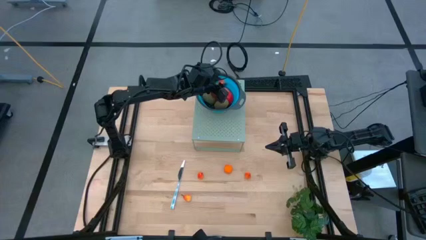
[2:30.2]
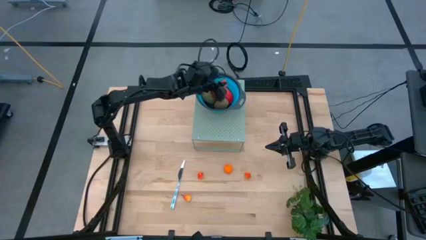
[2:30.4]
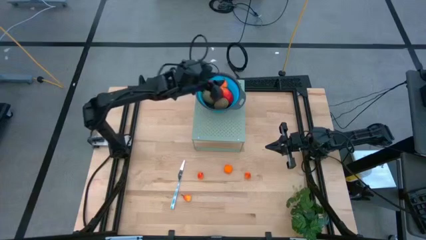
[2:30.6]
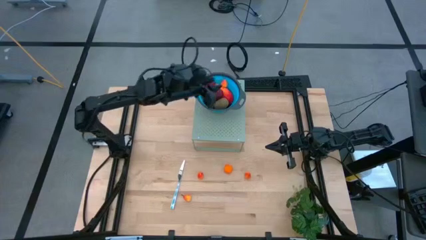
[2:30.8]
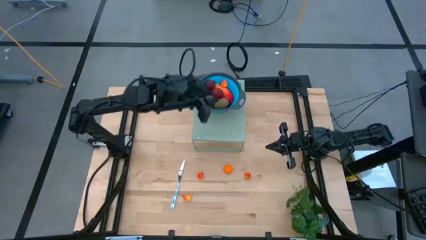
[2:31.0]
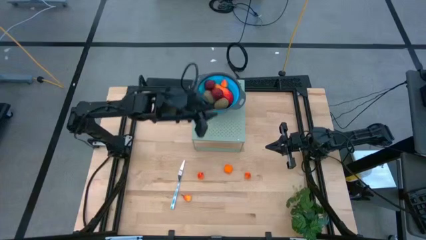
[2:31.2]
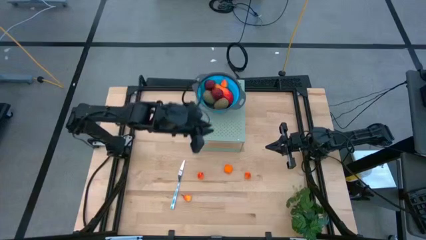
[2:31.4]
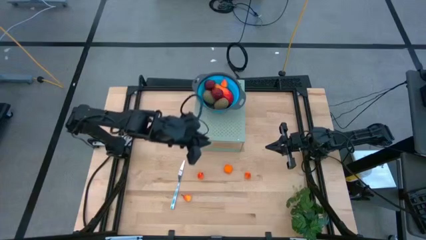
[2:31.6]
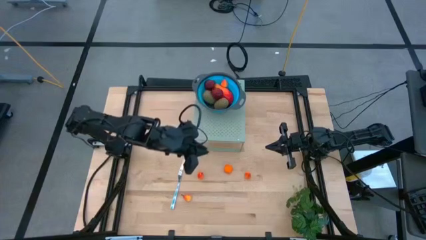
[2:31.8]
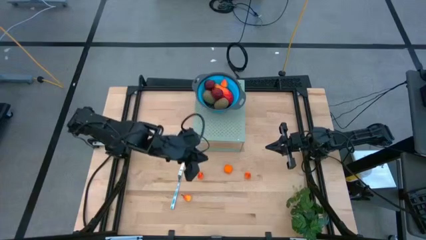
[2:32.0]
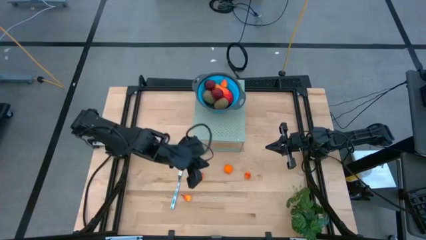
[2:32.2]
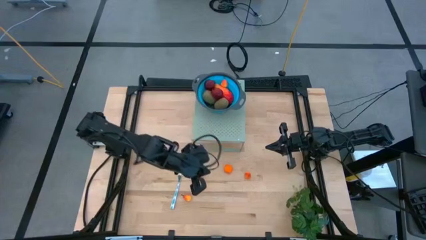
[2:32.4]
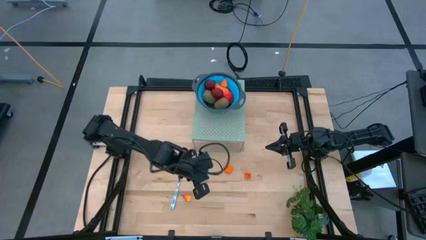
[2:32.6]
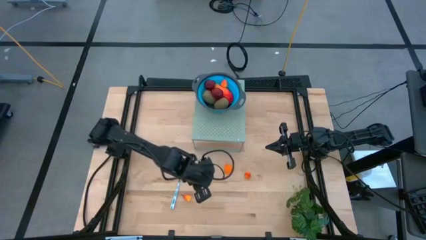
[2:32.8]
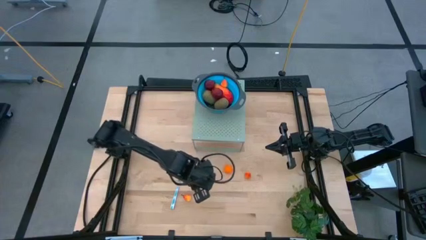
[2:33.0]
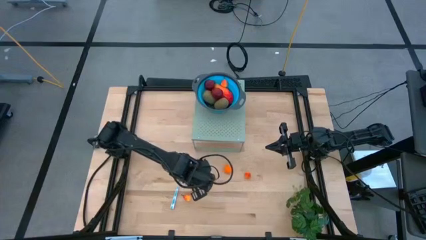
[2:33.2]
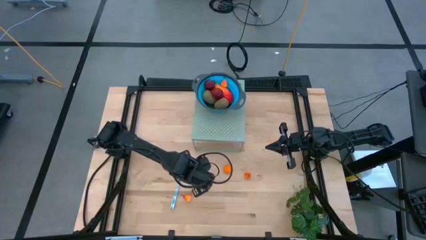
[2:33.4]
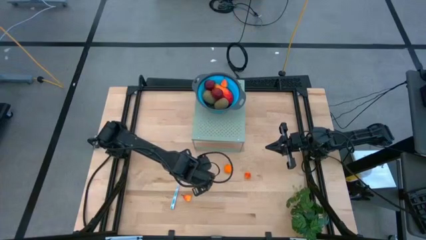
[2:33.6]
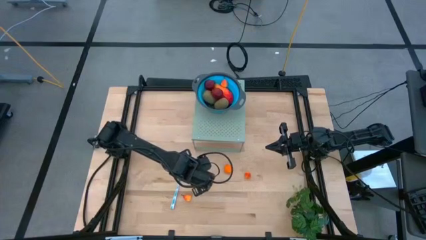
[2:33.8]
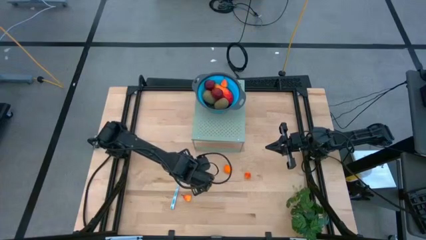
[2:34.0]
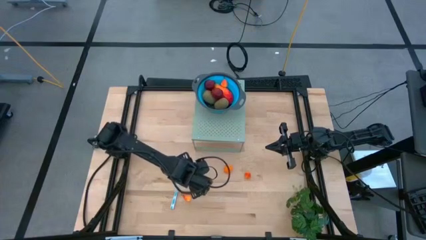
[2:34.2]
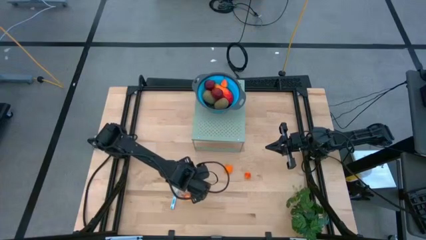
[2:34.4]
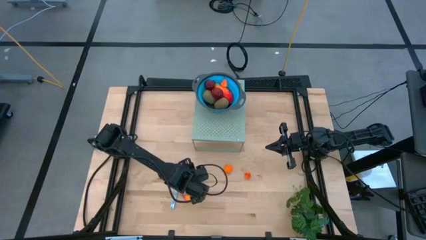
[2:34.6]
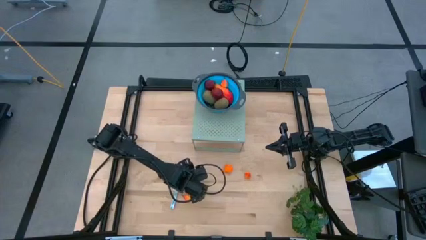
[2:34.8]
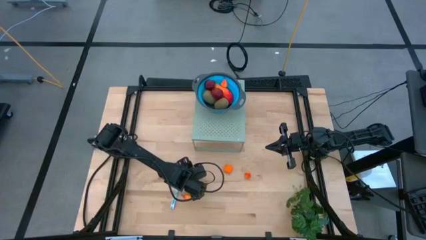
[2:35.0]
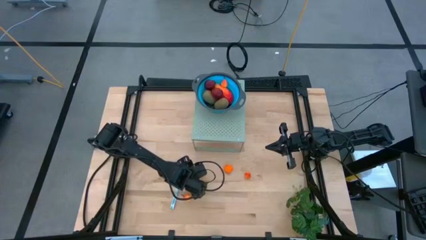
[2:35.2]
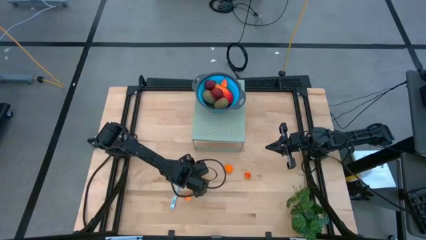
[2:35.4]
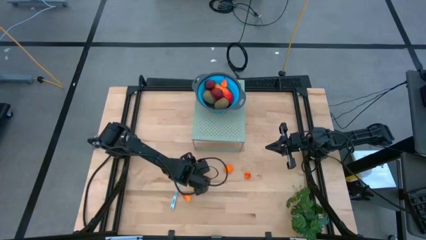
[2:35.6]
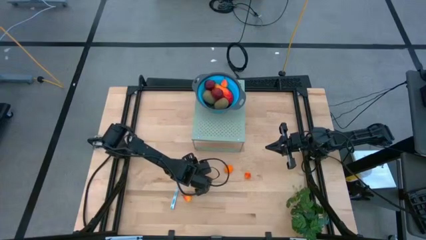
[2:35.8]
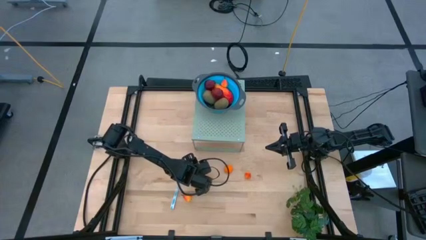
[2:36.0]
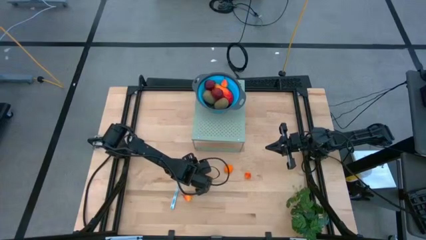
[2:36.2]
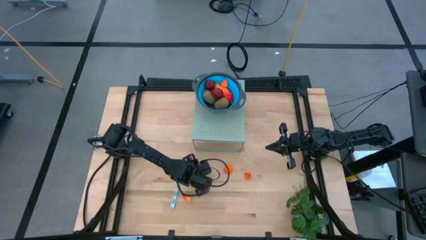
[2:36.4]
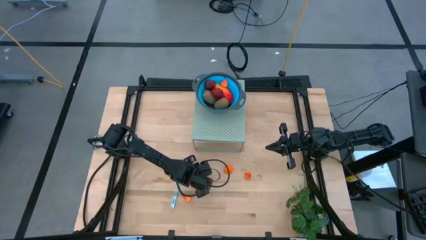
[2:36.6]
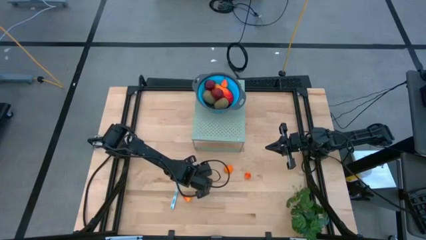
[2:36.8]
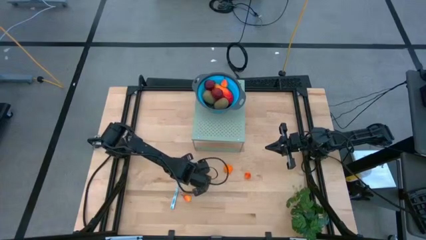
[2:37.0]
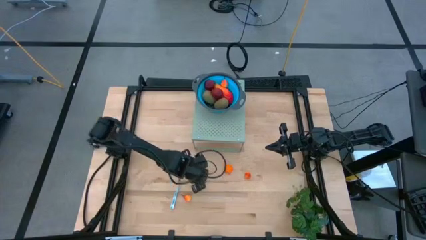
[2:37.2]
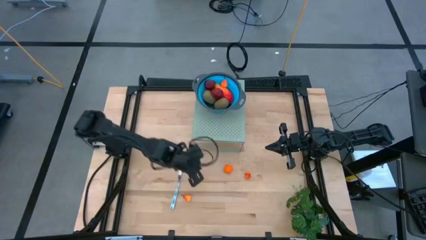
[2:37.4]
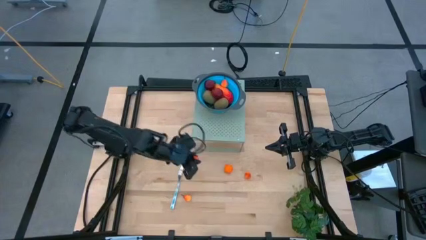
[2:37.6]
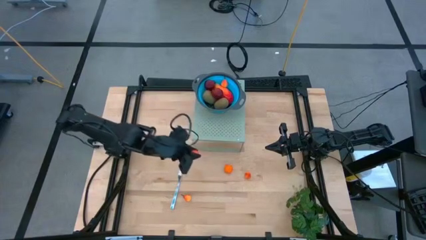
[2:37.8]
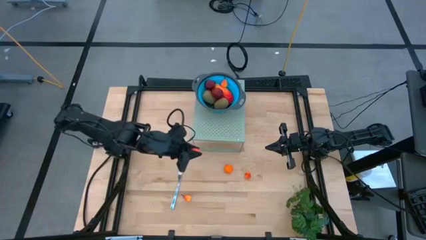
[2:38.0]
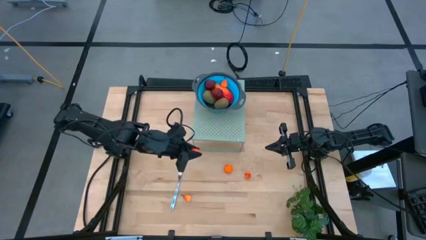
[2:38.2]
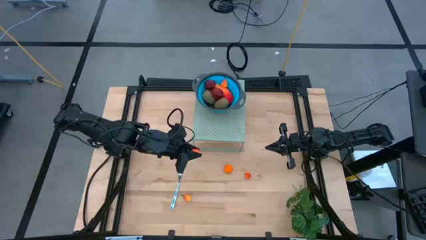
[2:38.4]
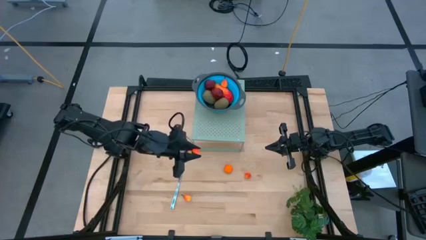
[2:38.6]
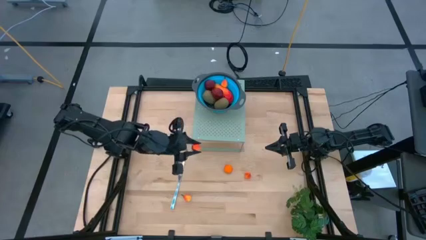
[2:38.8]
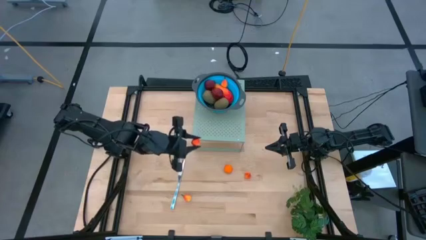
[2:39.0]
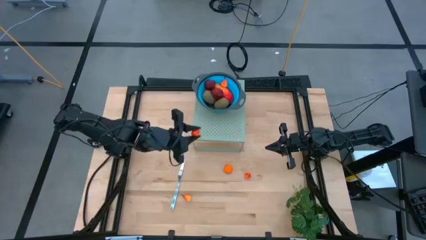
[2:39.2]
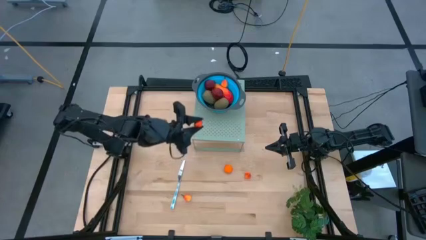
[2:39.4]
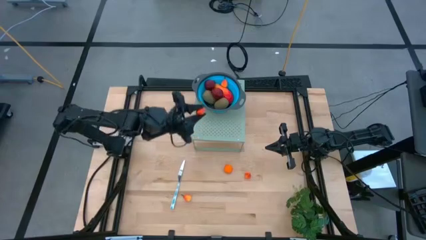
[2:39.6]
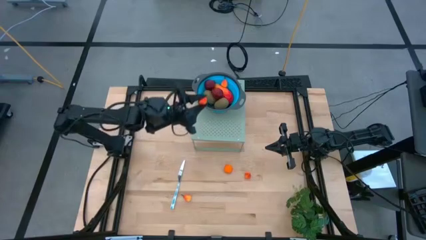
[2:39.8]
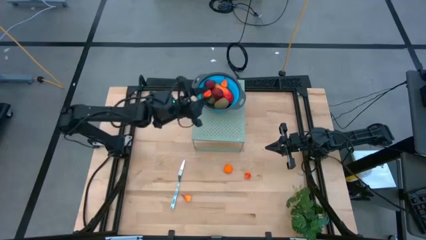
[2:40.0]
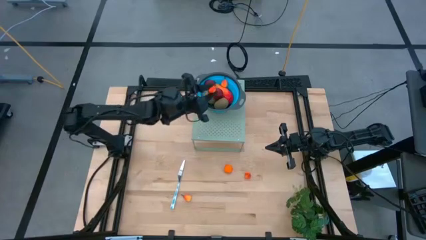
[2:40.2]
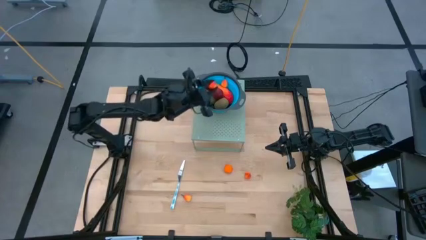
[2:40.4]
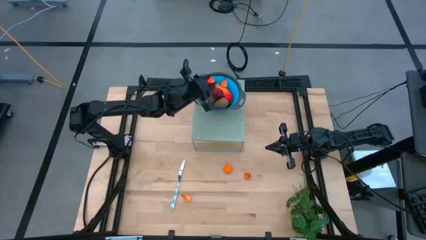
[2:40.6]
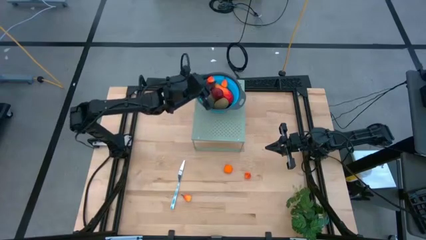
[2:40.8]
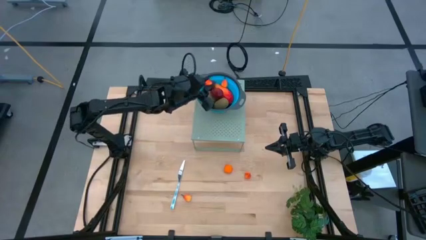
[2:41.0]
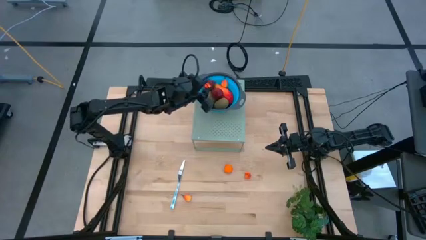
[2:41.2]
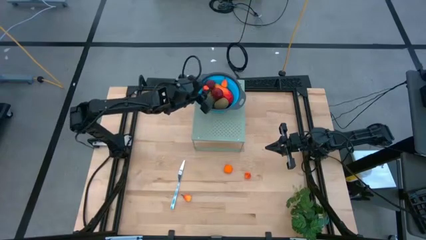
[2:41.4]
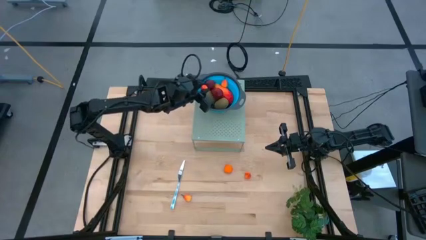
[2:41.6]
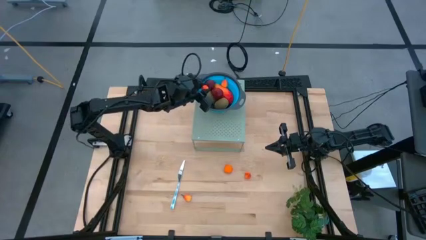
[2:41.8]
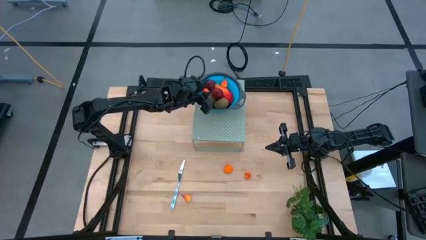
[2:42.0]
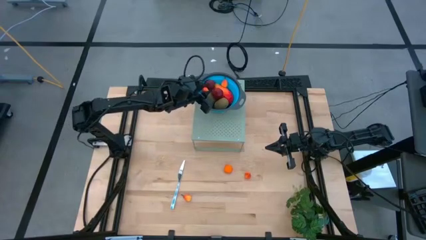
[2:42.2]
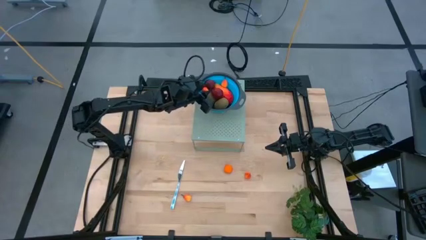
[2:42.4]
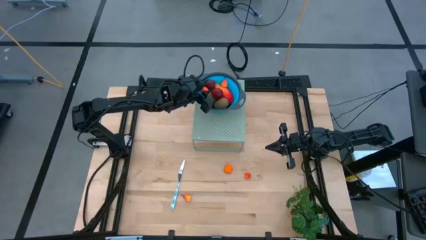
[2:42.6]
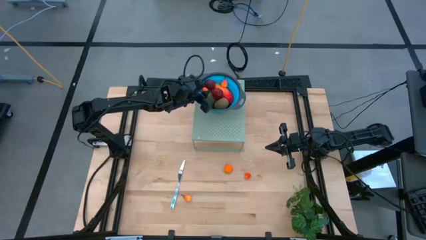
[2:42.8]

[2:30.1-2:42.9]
Task: Pick & Place Fruit
Put the top Pear into the blue strainer bowl on the shelf

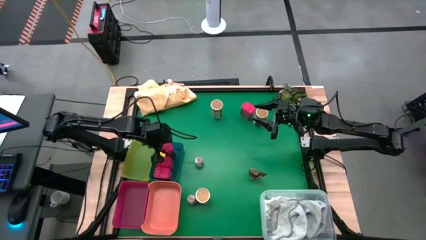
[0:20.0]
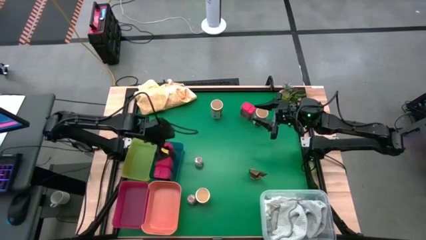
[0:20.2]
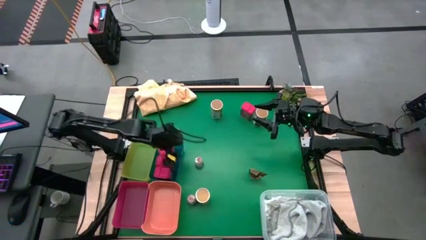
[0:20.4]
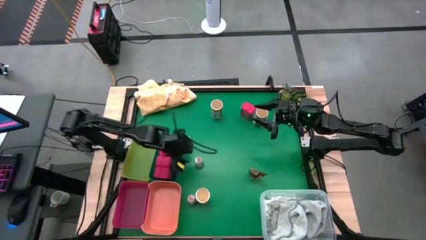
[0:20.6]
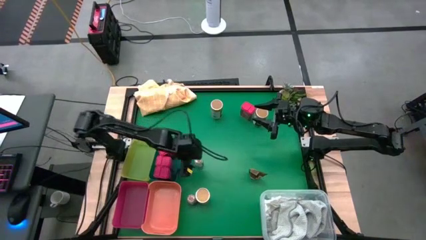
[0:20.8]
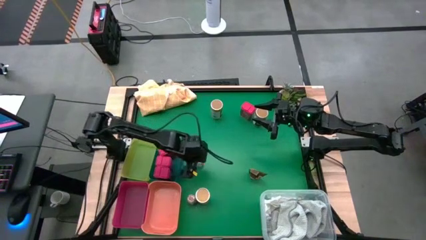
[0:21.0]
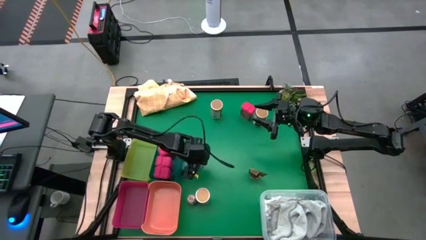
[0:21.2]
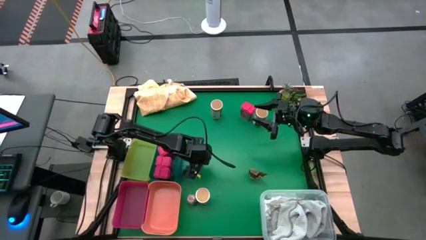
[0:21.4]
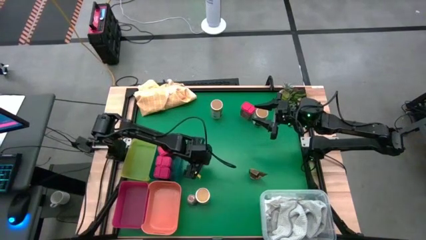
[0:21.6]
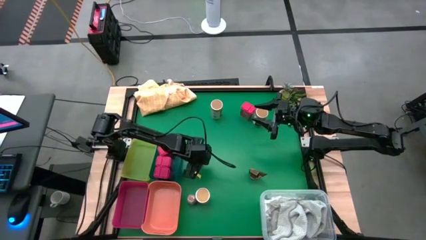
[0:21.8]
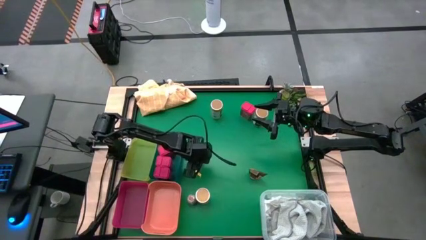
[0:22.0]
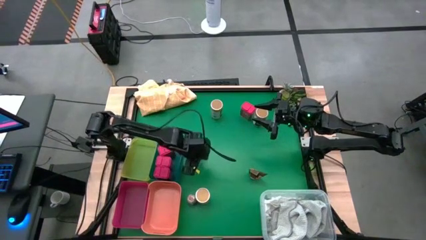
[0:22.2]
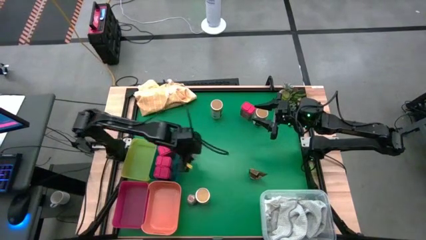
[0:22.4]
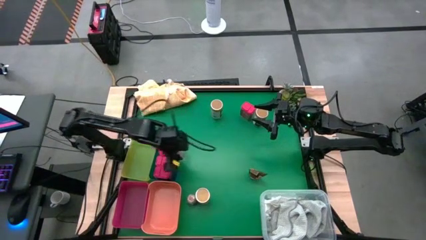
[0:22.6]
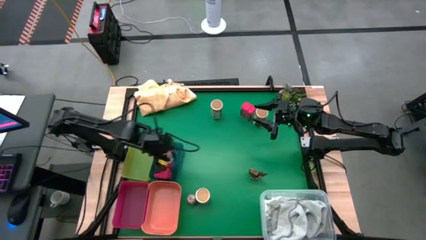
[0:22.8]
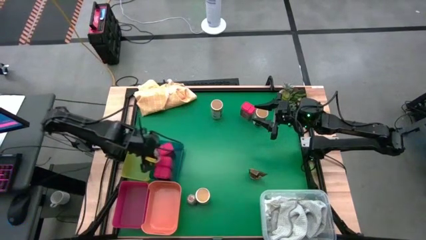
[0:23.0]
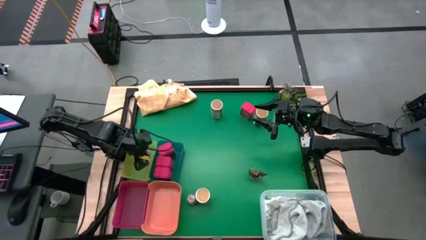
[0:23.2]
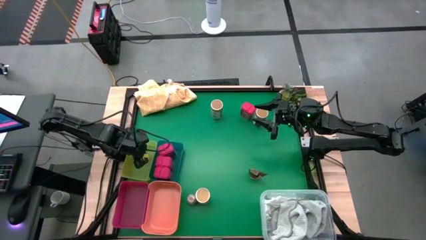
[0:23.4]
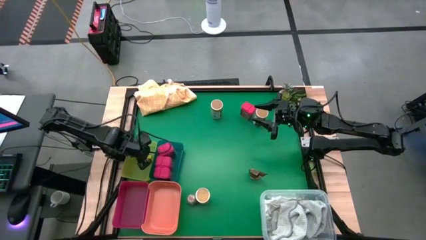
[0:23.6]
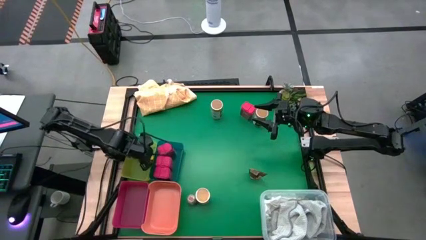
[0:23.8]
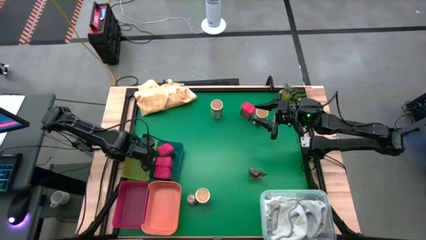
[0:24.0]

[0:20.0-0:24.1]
Task: Sort spices by type
Put the brown seasoning bottle into the yellow bin
